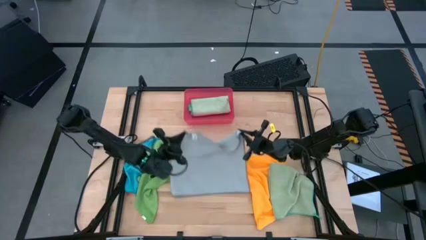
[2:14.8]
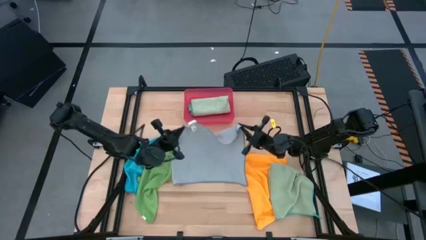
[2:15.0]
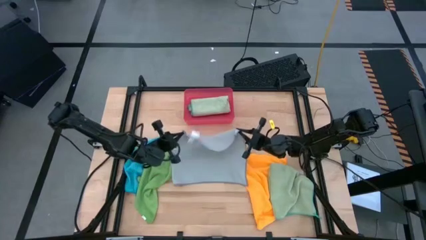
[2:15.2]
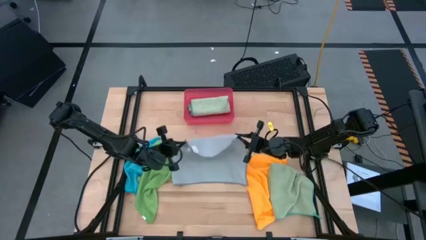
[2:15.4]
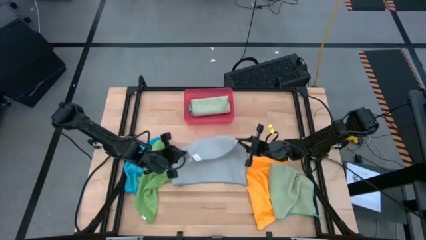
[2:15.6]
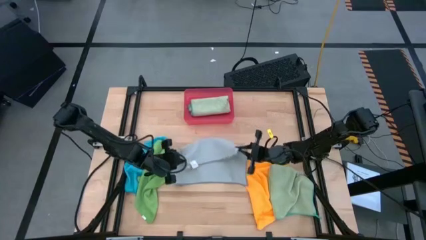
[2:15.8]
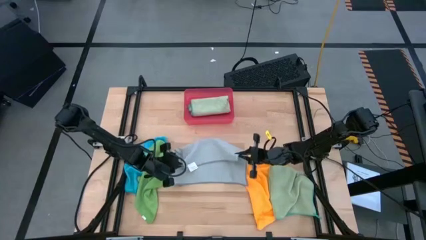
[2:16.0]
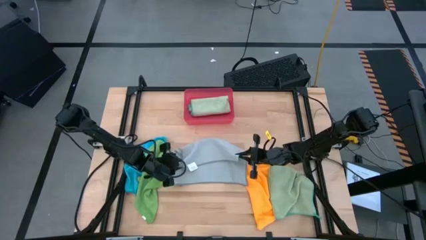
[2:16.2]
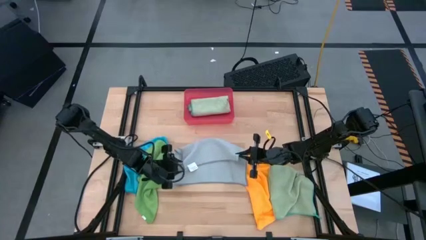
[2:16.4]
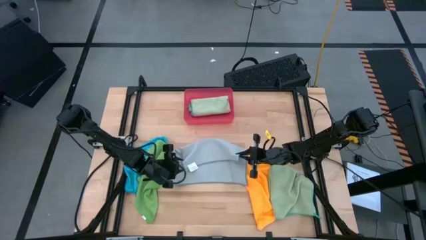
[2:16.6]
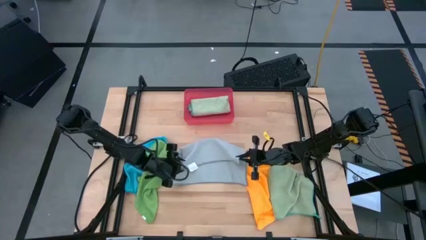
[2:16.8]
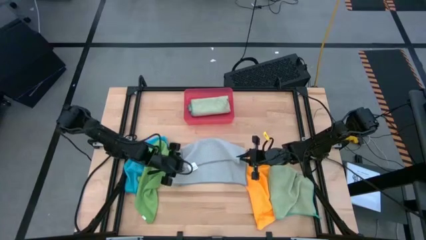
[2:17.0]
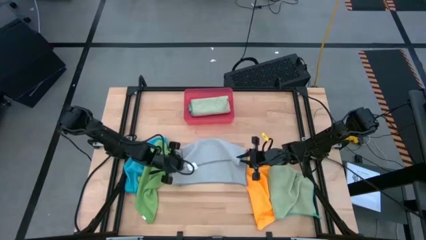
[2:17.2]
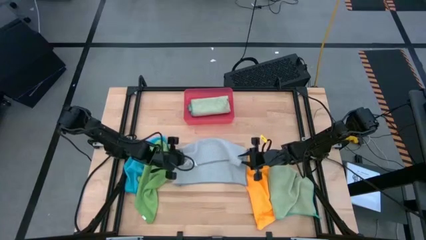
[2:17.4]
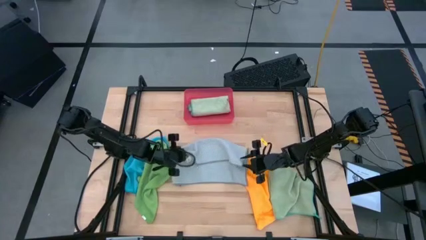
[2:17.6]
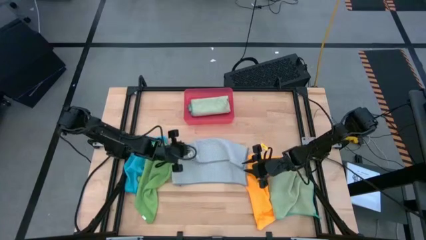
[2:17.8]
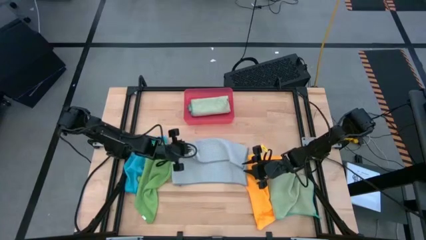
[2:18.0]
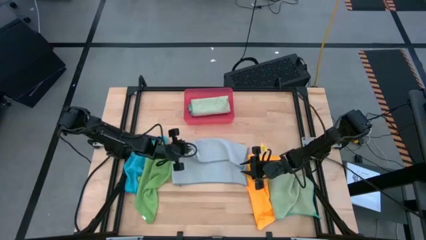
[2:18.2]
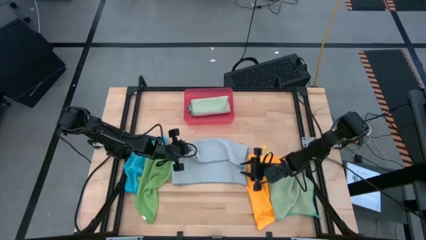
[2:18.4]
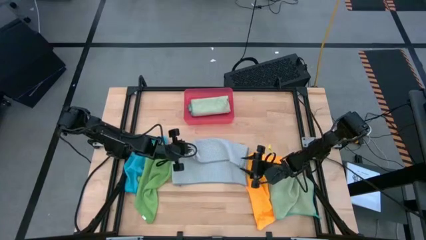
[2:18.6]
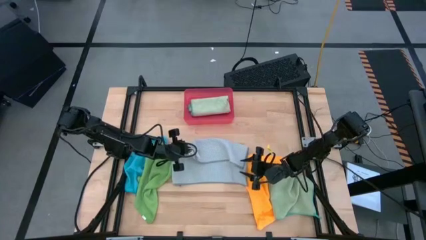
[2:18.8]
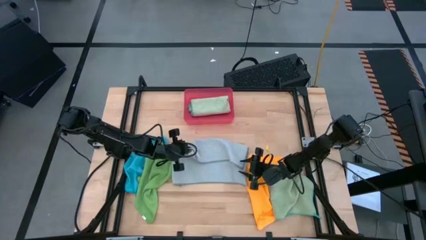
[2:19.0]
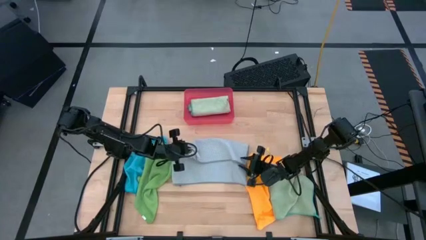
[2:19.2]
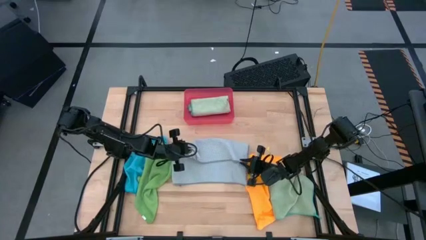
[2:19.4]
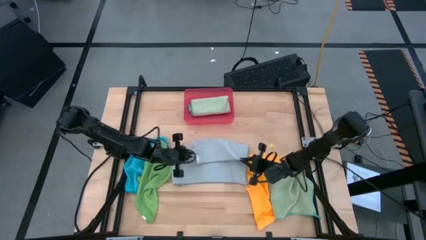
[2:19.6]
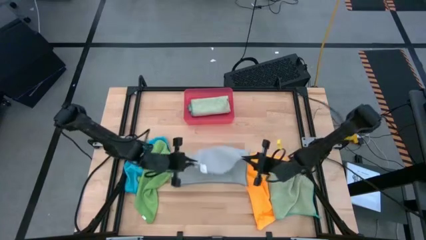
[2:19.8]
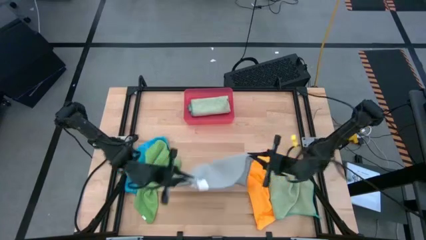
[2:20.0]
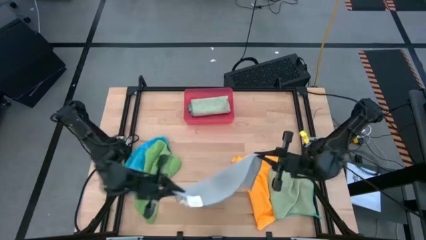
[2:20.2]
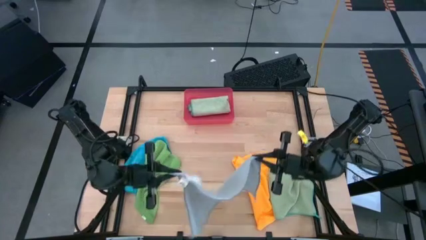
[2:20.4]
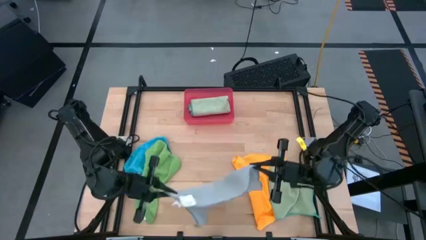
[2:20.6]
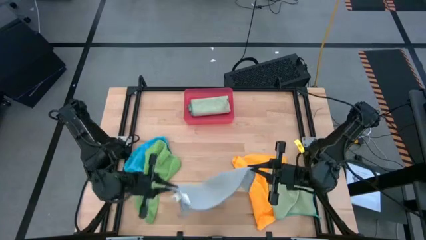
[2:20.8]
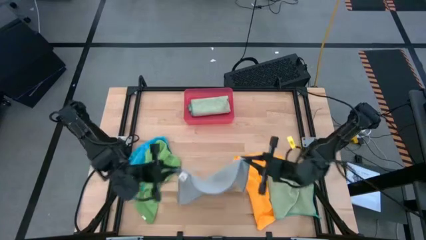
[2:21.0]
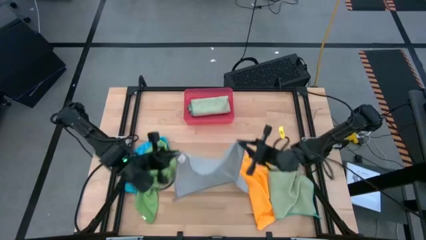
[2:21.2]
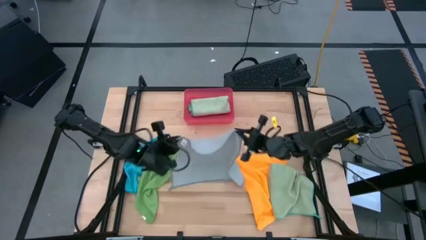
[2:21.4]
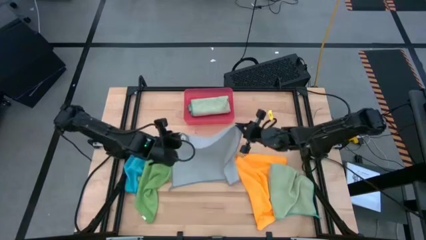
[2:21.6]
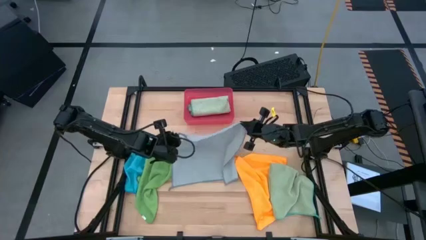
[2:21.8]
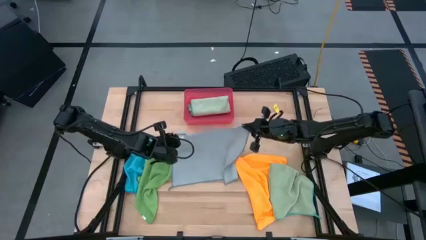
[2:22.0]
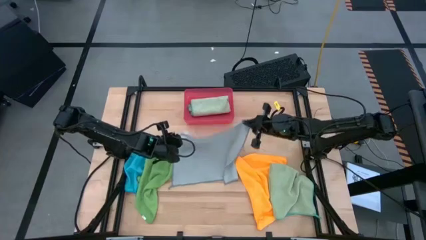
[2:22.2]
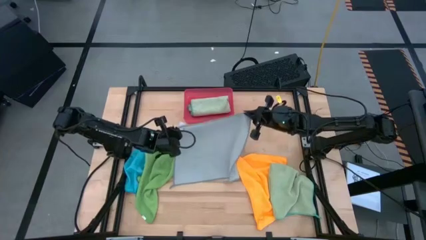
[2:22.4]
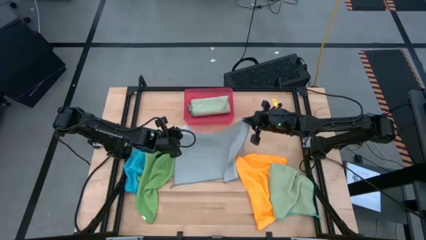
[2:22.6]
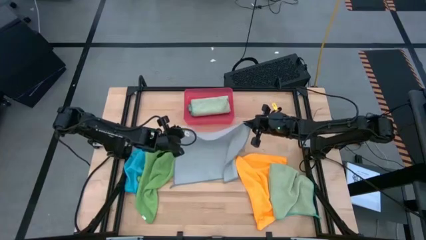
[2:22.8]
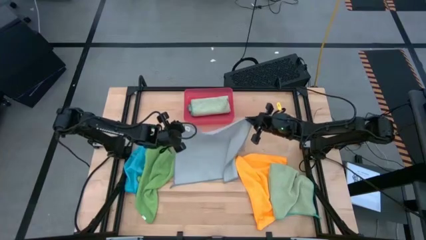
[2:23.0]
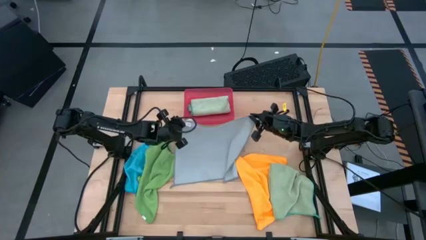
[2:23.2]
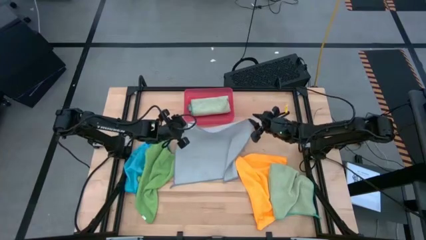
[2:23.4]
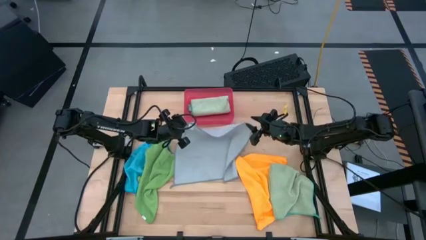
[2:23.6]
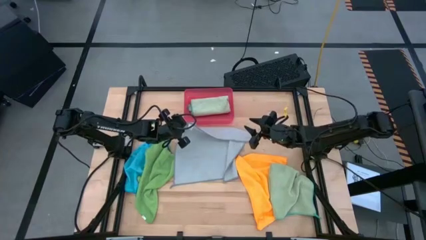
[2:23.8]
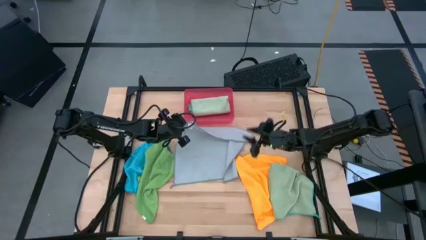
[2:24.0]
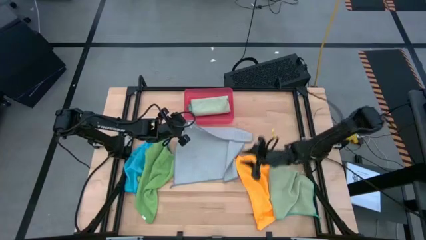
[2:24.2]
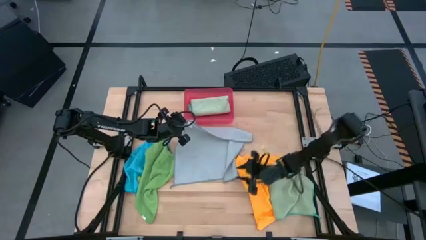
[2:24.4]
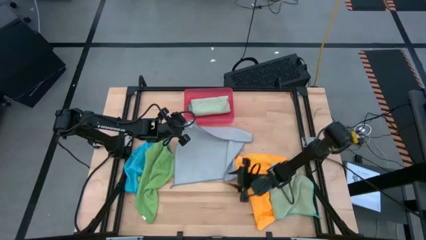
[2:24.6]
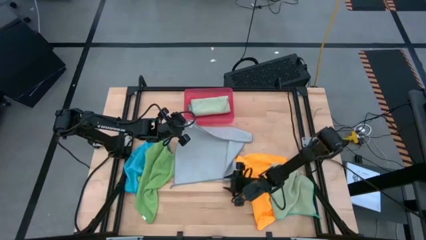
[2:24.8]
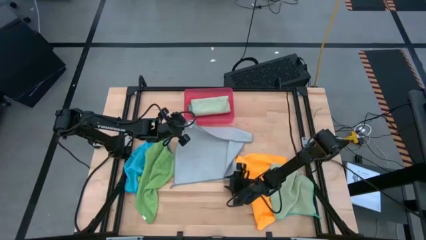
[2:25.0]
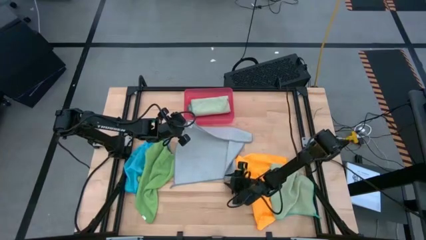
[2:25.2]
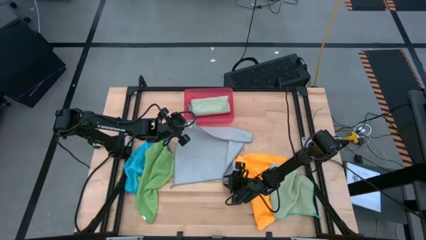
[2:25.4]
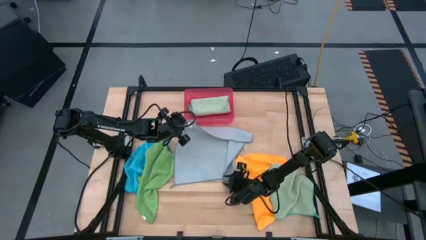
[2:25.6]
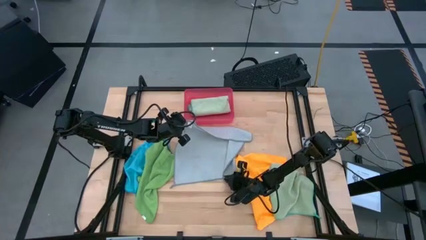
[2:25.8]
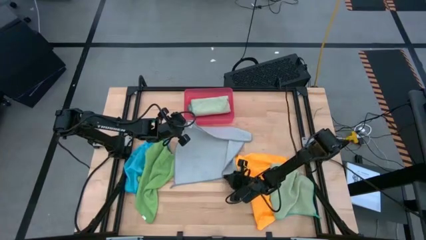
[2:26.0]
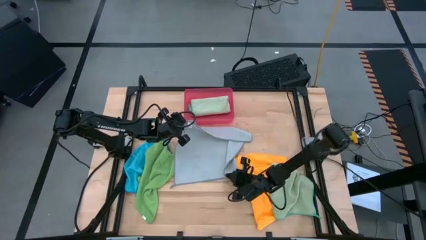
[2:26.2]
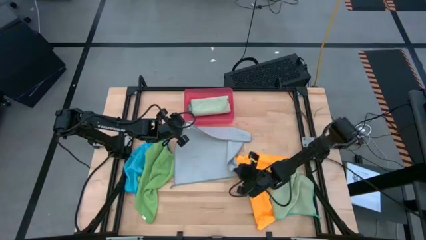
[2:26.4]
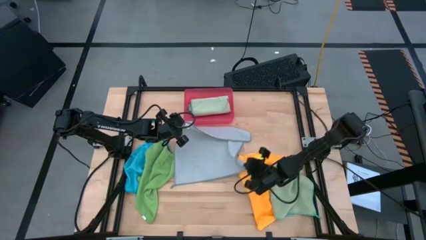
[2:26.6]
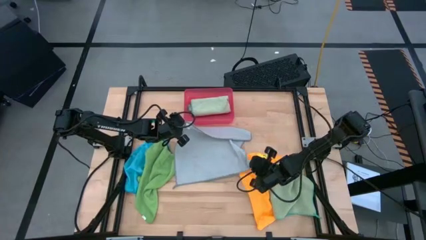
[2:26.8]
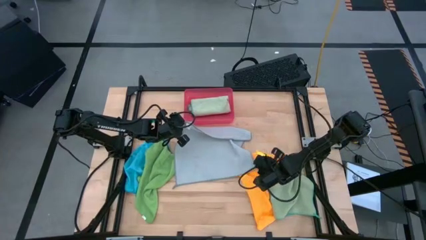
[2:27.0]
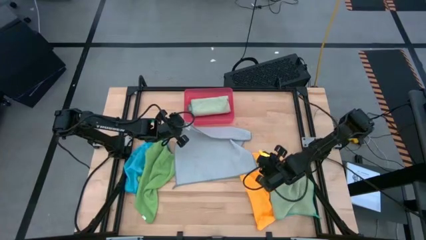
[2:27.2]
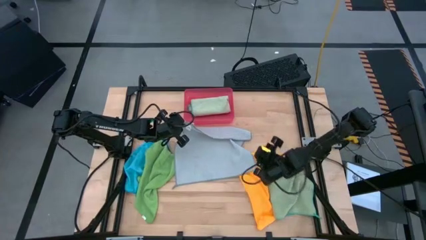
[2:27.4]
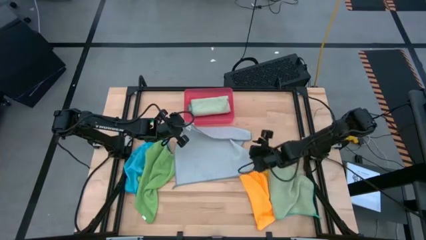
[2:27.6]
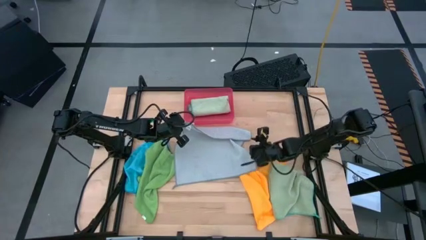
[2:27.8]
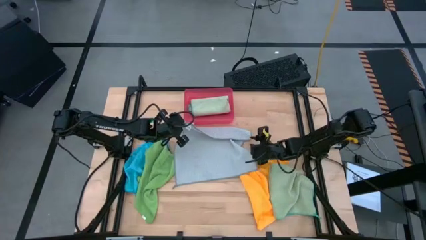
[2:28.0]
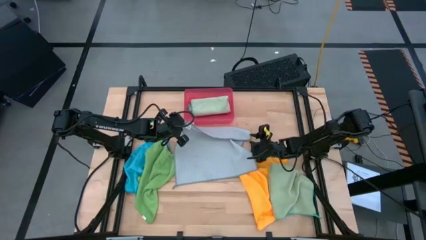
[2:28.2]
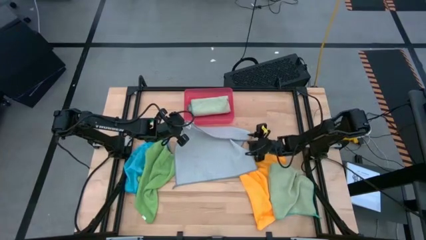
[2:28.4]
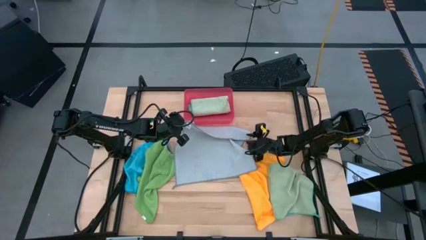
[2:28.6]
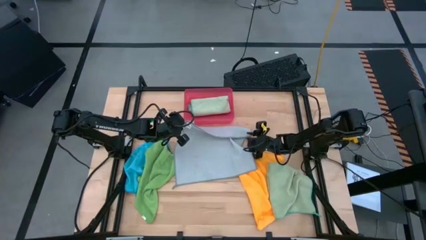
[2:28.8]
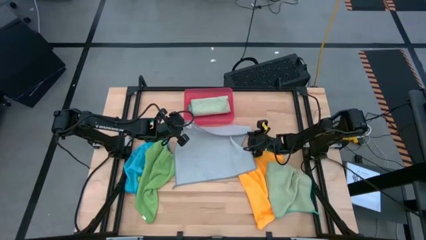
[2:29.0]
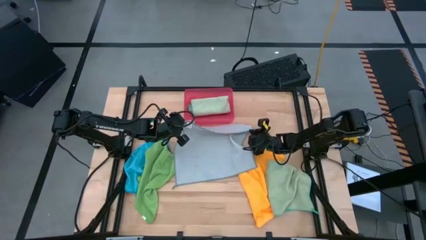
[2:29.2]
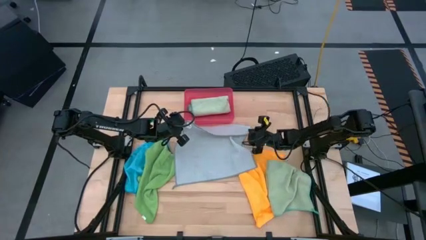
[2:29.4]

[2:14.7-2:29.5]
Task: Fold microfiber towels
Fold the gray towel
